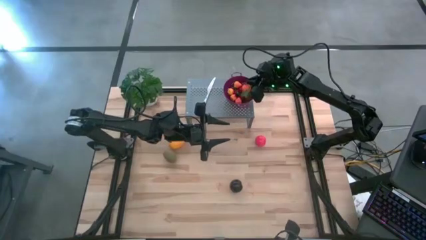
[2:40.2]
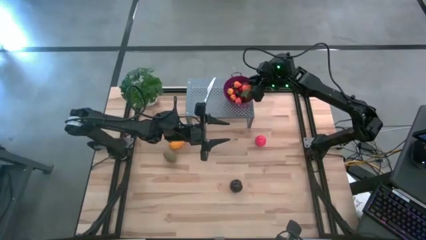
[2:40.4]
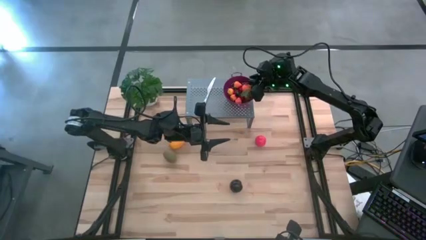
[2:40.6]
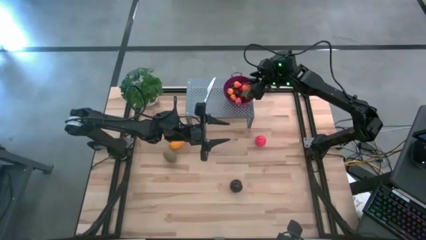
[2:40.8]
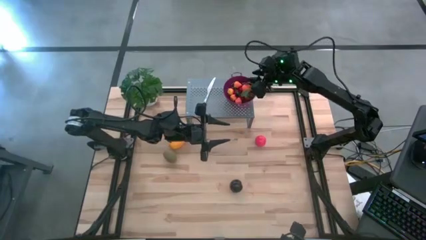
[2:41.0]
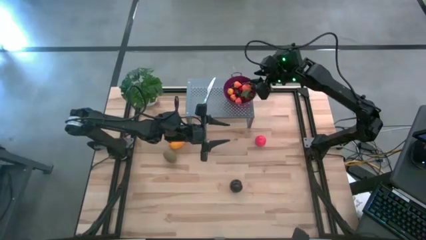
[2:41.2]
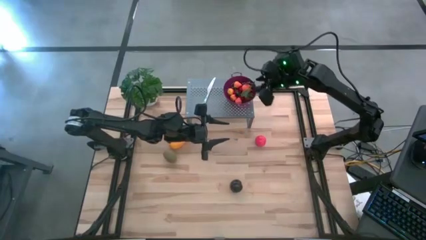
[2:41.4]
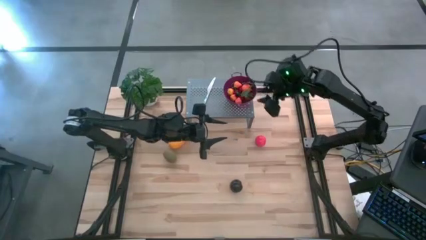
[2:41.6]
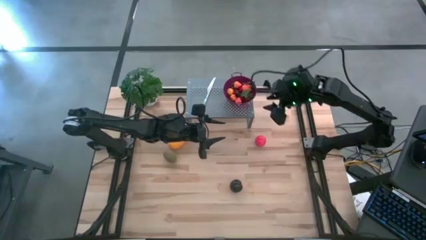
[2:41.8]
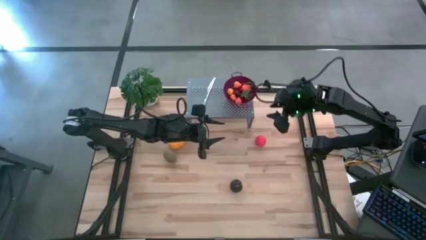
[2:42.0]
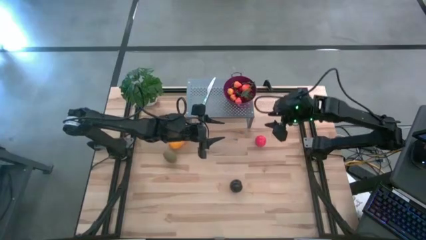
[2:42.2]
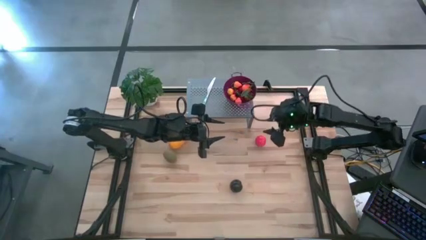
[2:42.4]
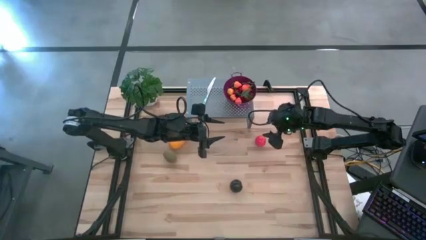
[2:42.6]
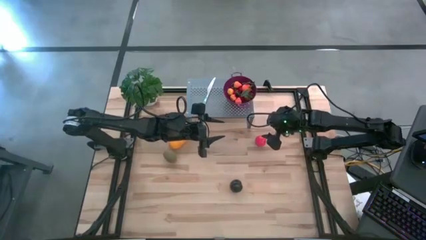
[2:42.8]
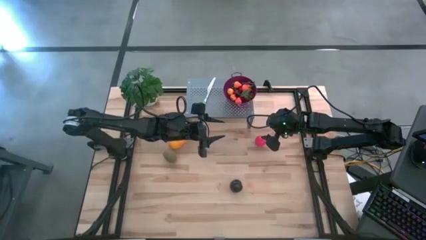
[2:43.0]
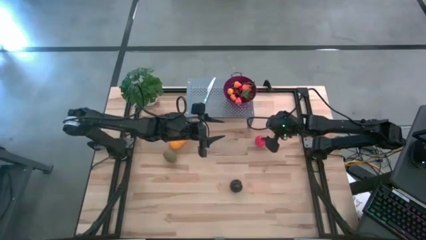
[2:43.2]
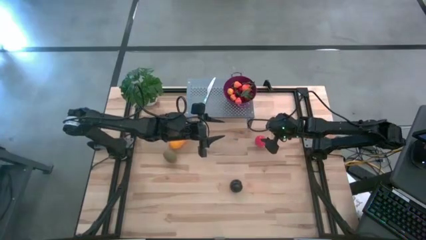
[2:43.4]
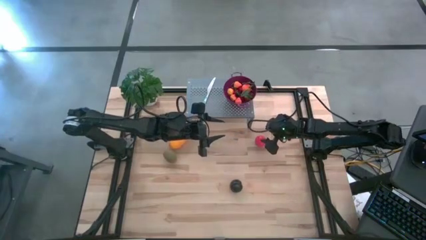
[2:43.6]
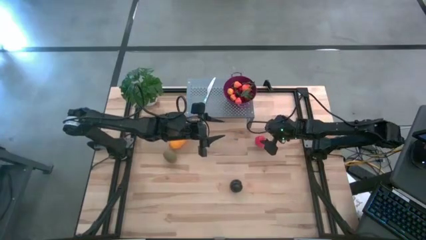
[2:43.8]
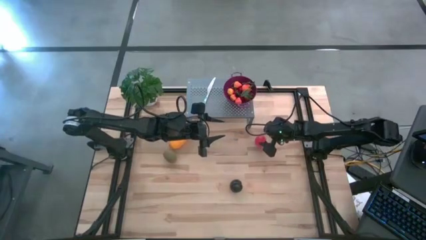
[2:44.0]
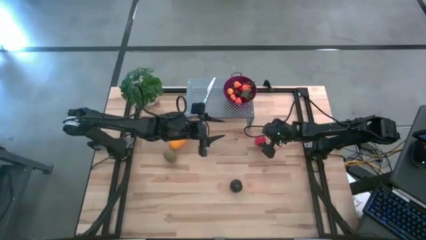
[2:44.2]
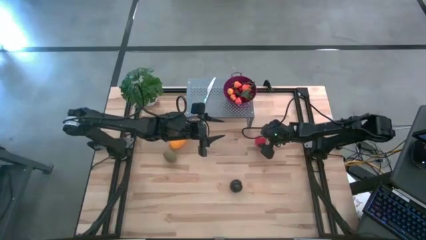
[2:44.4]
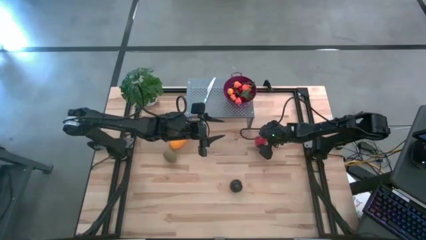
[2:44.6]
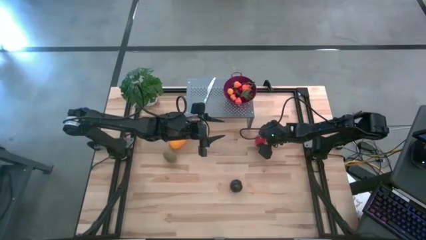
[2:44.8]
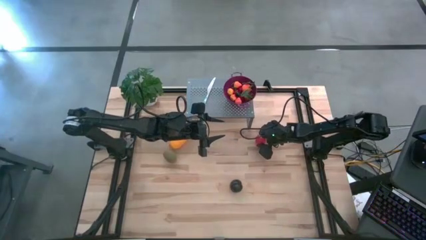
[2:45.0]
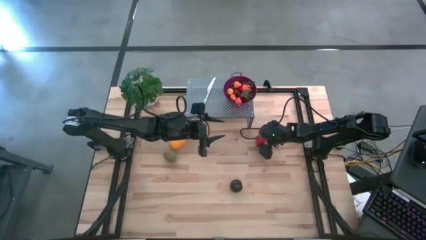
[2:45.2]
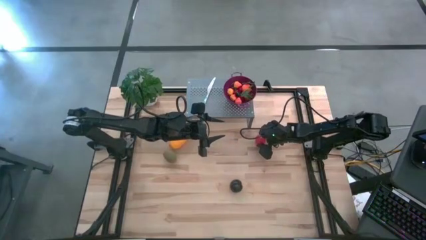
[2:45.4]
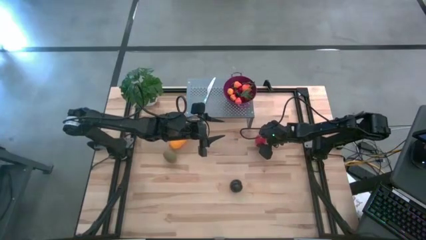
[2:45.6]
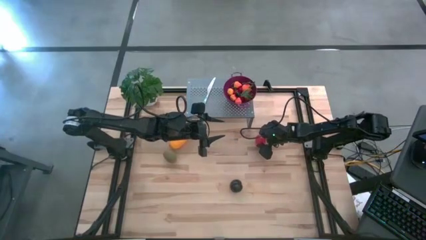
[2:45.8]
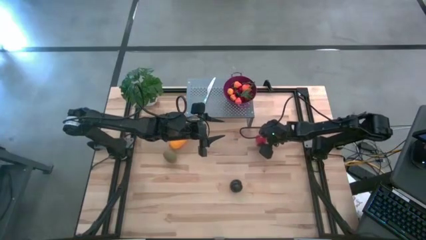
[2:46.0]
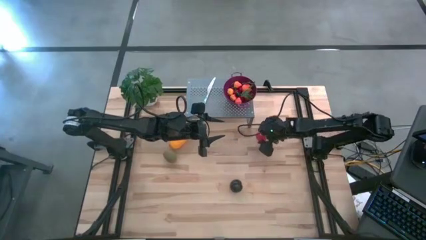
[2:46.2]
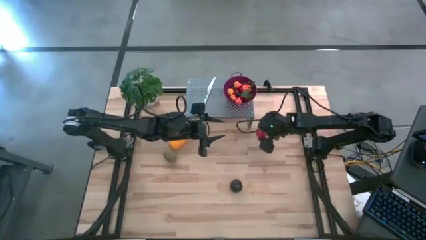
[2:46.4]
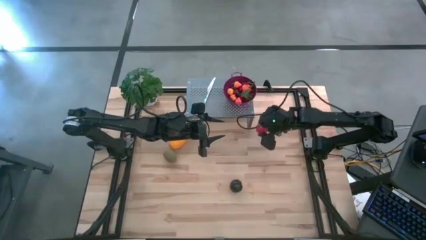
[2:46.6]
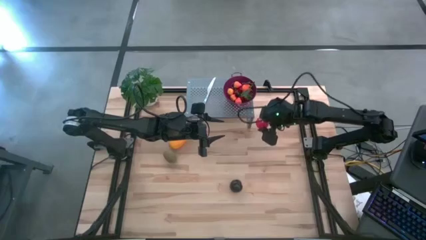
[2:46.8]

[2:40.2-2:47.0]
Task: Pick & Place Fruit
Put the red tomato into the violet strainer bowl on the shelf

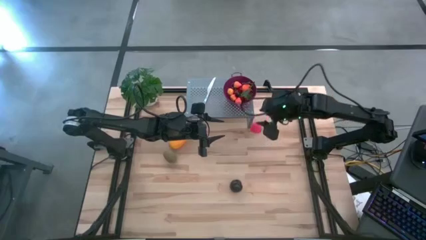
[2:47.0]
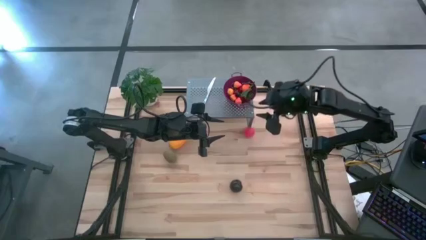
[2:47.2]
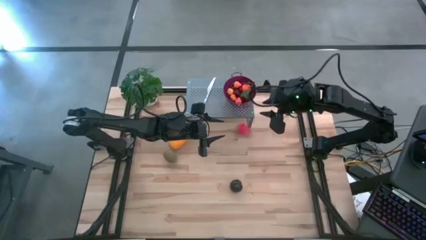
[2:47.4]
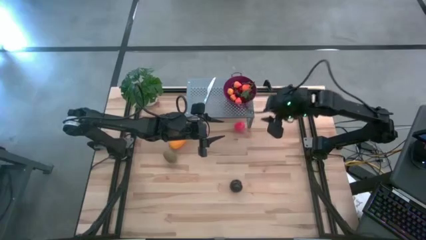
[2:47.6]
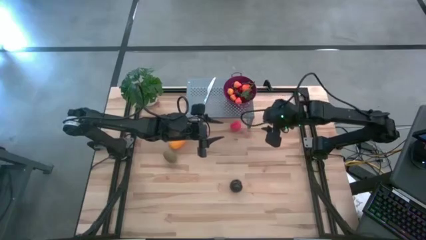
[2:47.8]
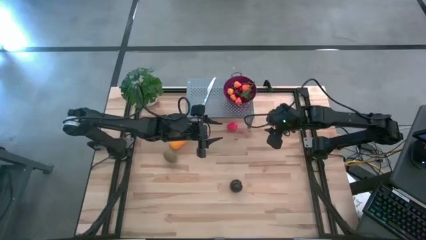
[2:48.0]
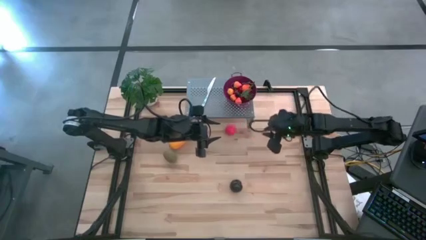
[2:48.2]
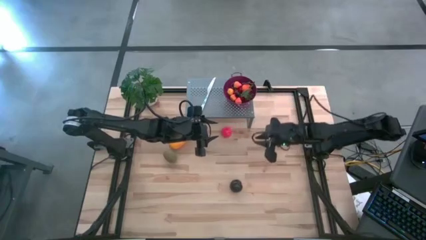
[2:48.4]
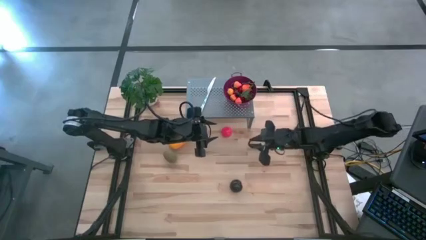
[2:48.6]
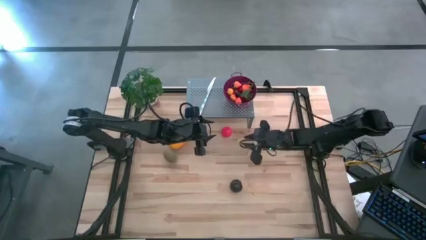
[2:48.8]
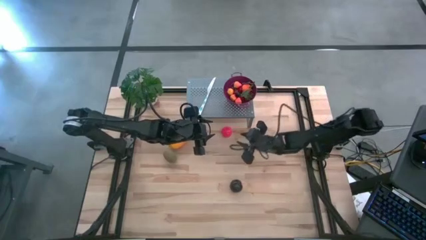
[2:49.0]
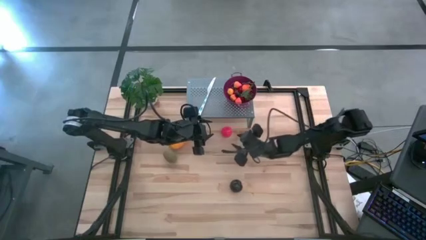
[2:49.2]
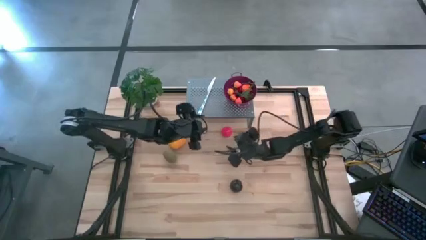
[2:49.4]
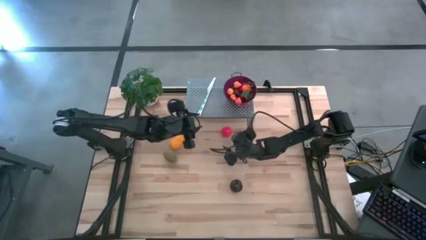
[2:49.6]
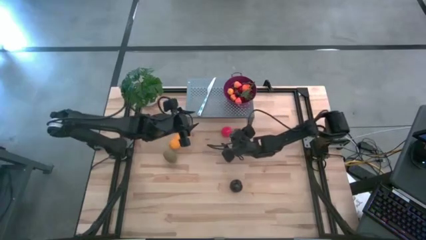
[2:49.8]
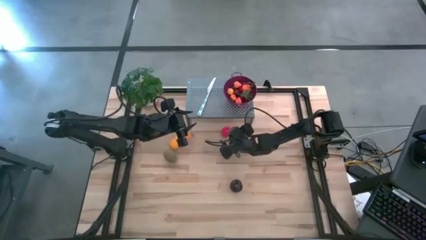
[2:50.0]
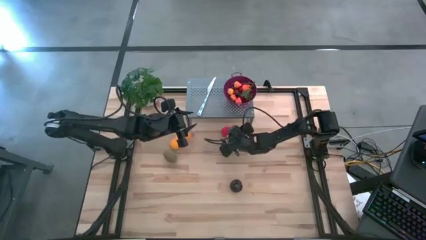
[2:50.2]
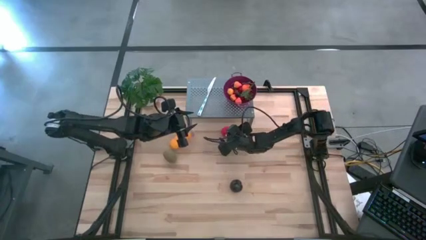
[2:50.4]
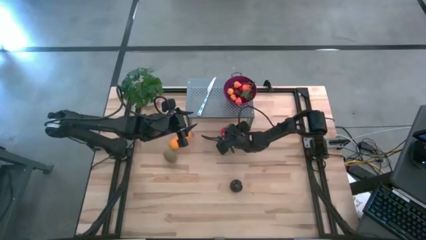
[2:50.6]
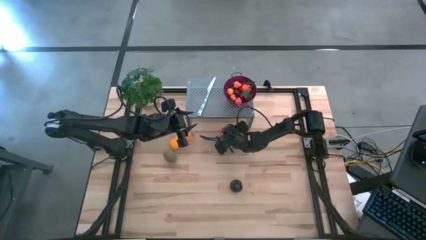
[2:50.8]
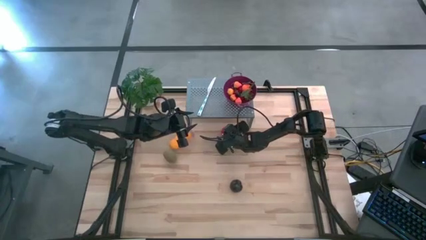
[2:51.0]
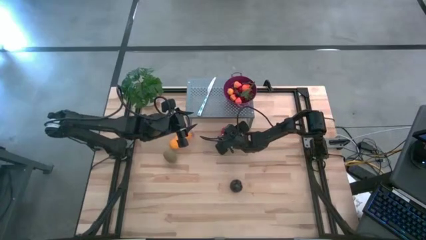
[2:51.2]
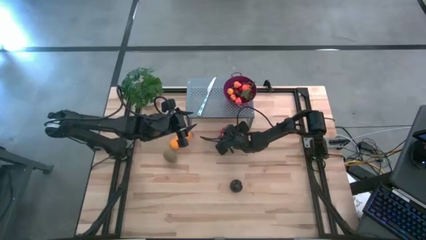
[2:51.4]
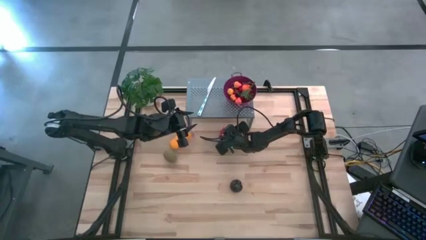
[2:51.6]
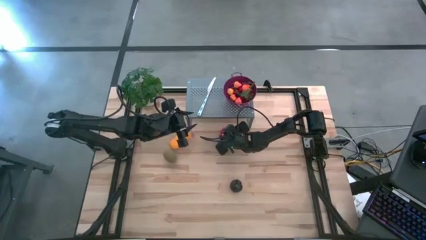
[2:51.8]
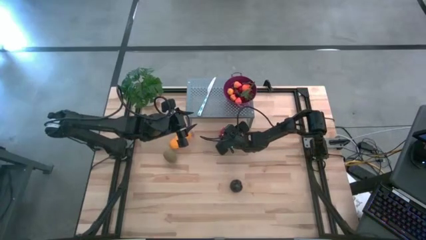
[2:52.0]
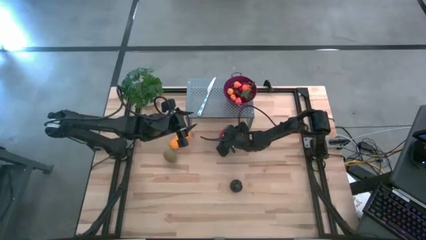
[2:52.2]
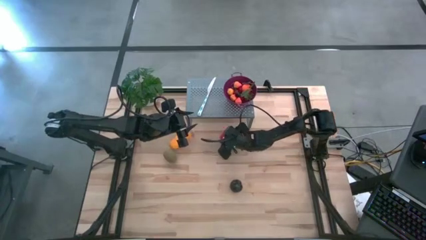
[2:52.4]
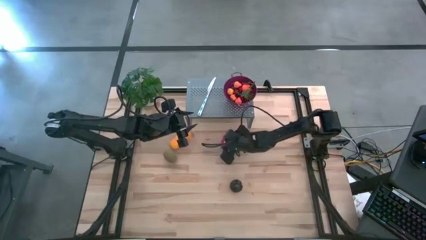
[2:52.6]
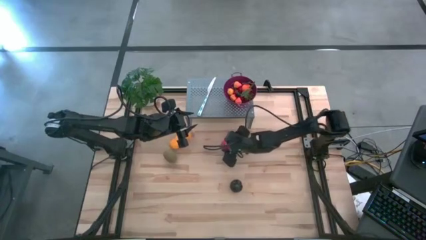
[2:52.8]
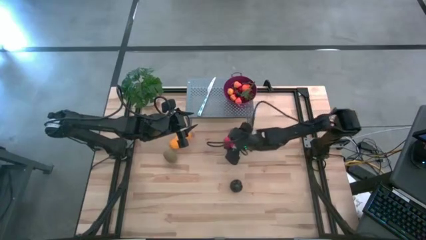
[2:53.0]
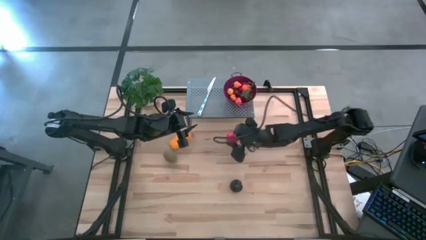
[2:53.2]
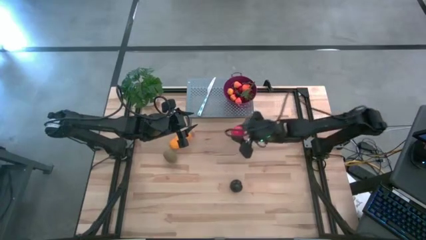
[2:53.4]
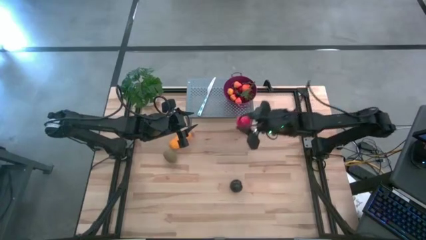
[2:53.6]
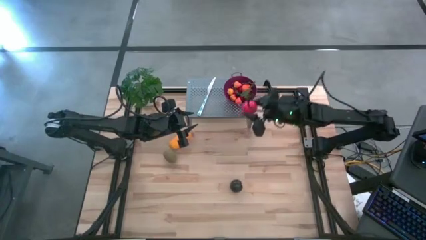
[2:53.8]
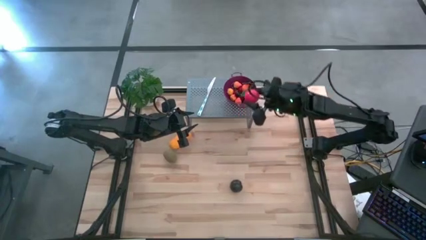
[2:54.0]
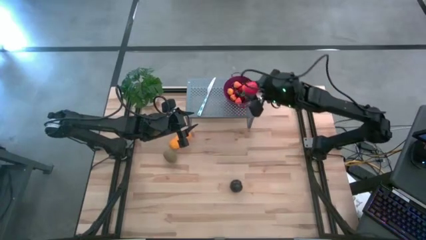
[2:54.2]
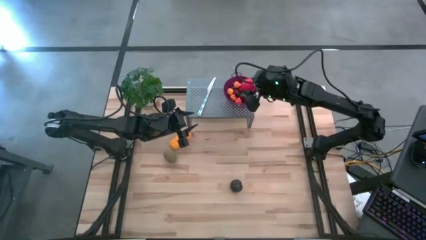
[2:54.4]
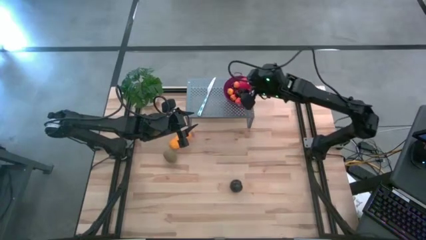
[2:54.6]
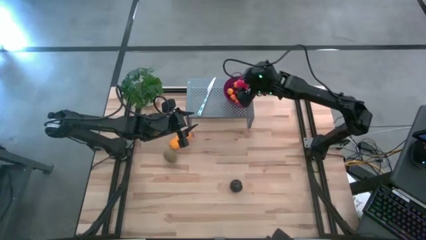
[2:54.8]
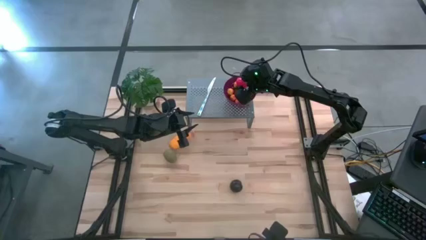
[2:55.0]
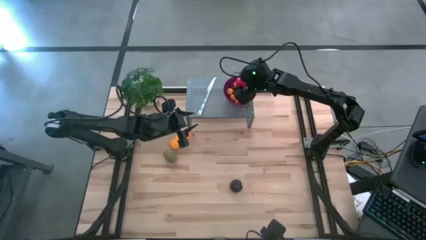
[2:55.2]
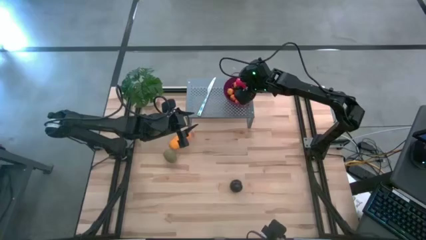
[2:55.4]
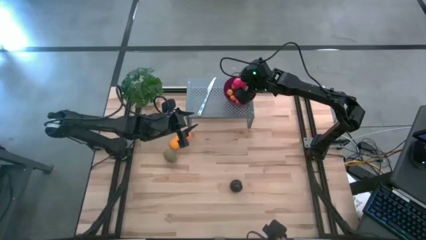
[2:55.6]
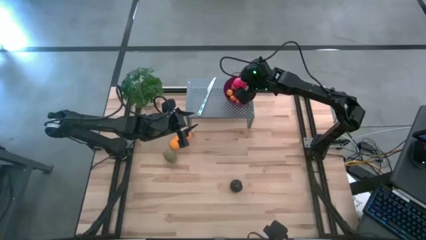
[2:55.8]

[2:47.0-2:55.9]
Put the red tomato into the violet strainer bowl on the shelf
